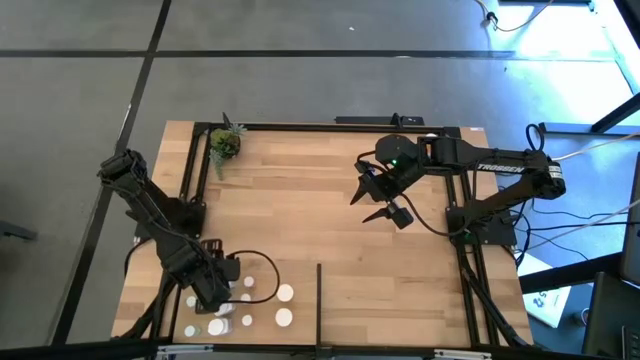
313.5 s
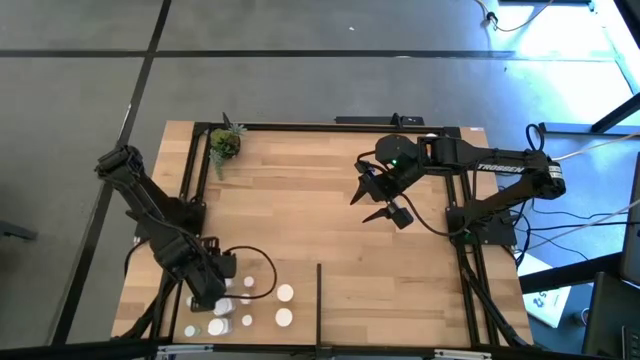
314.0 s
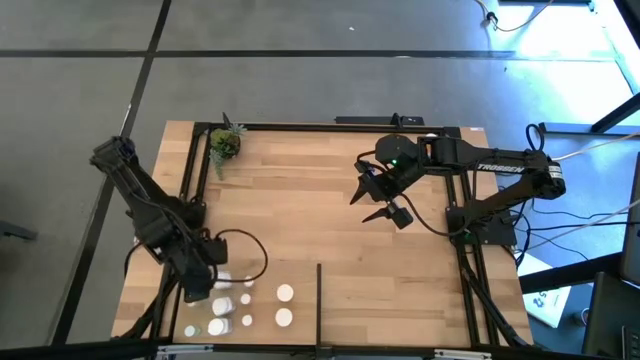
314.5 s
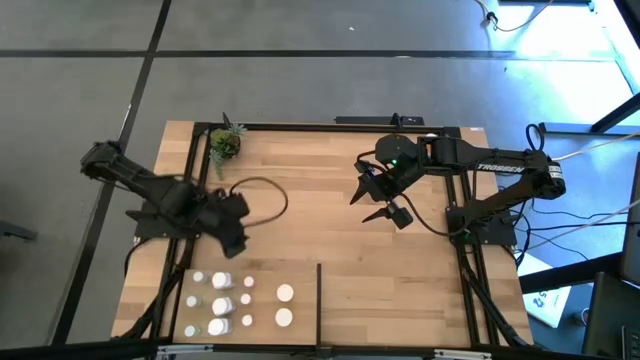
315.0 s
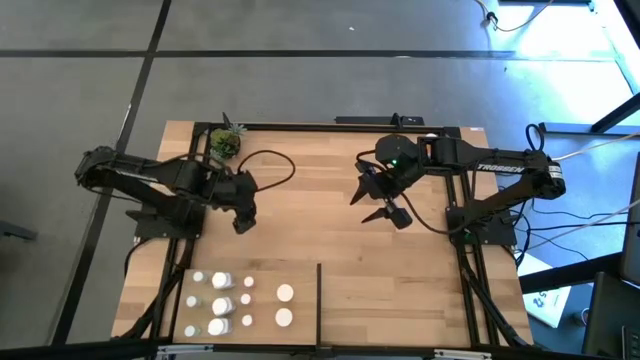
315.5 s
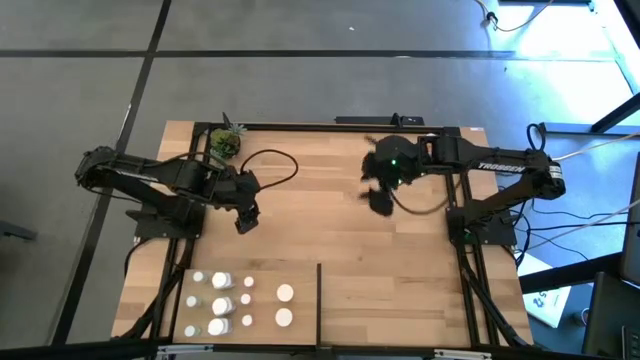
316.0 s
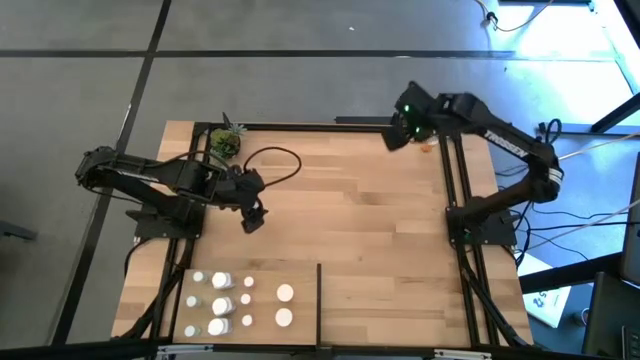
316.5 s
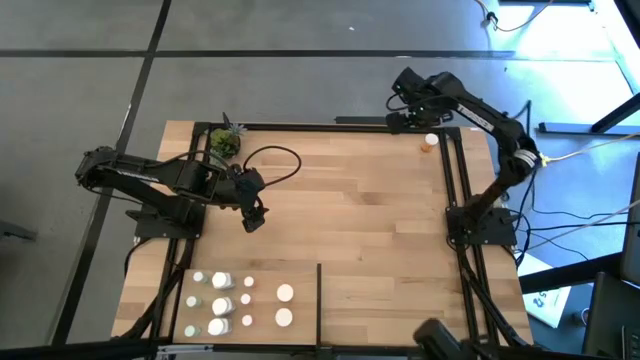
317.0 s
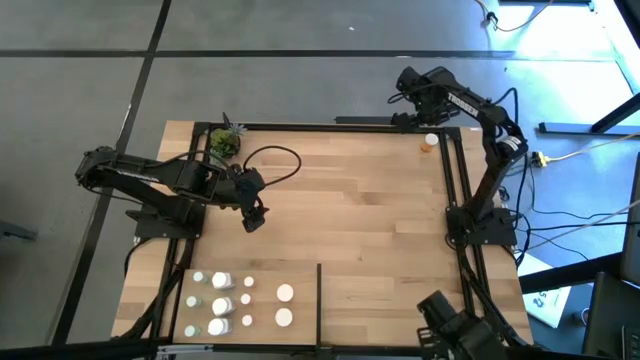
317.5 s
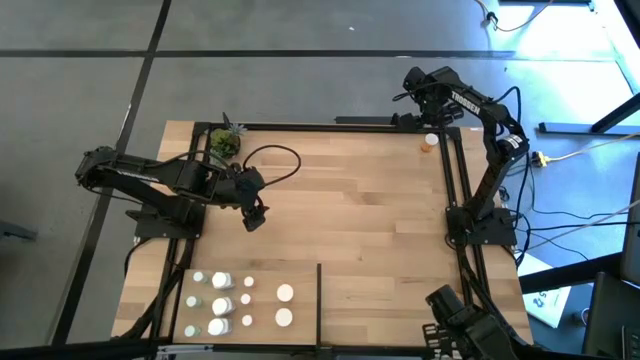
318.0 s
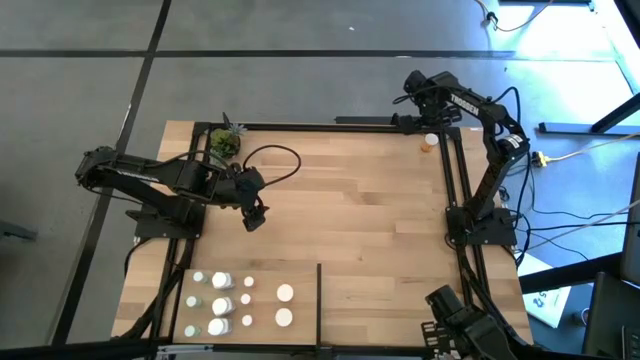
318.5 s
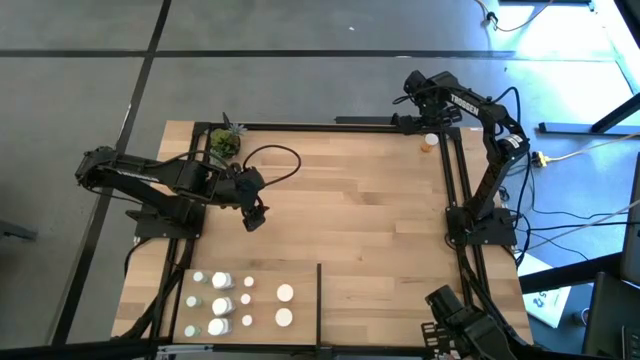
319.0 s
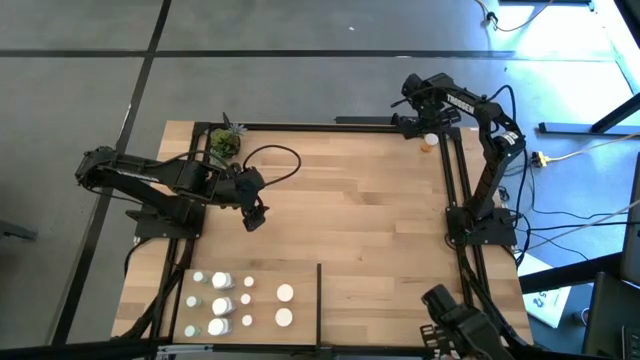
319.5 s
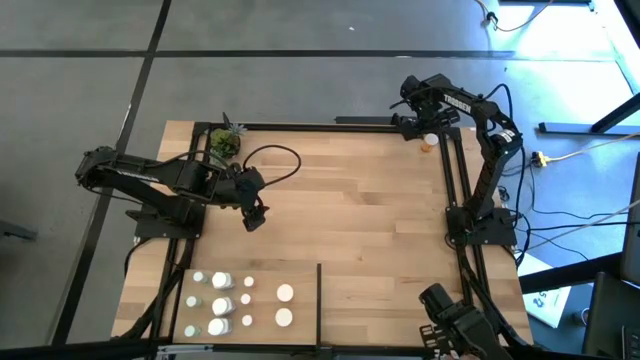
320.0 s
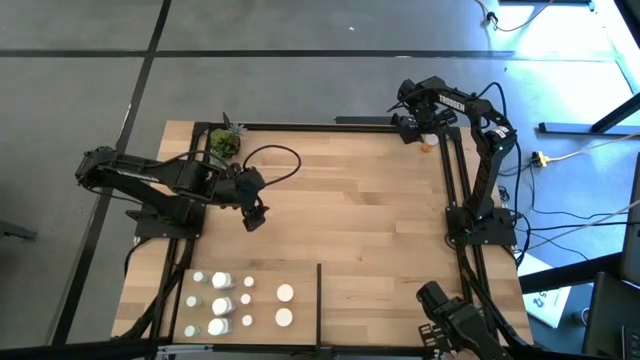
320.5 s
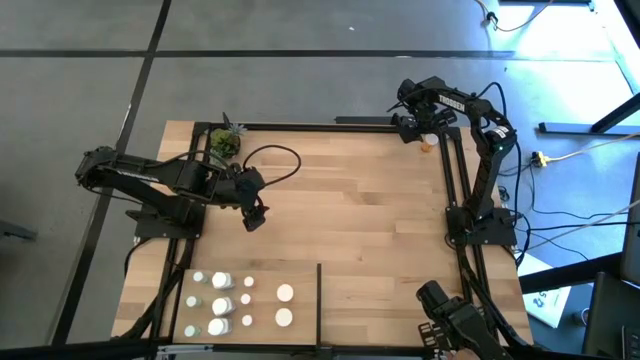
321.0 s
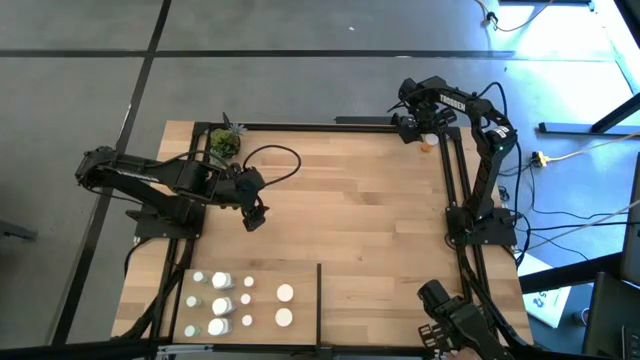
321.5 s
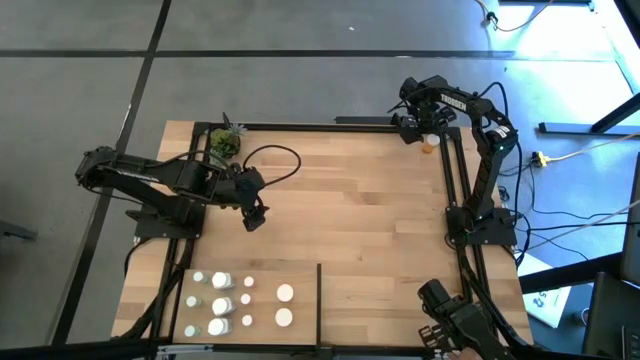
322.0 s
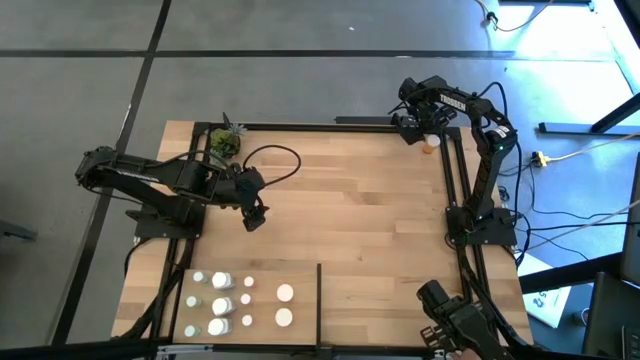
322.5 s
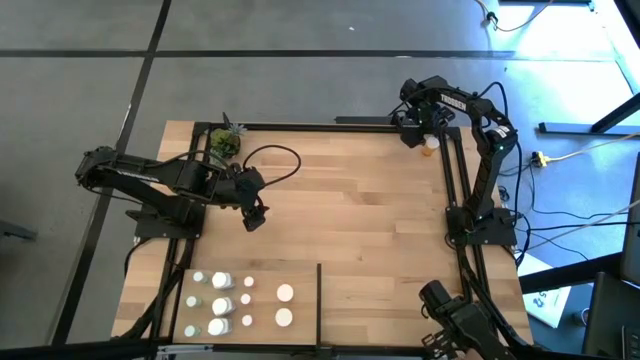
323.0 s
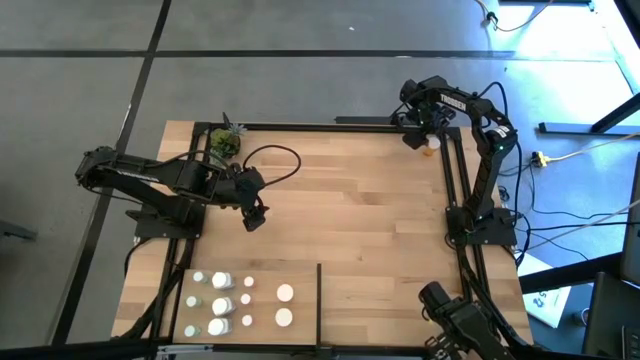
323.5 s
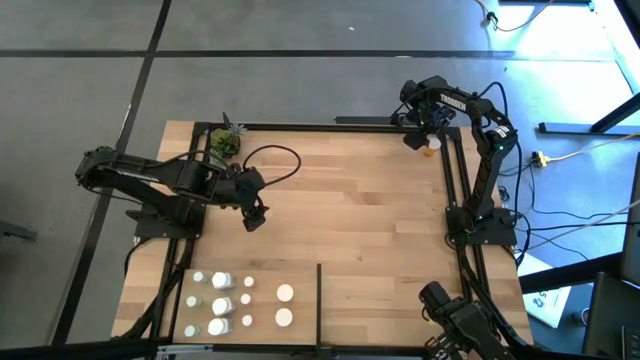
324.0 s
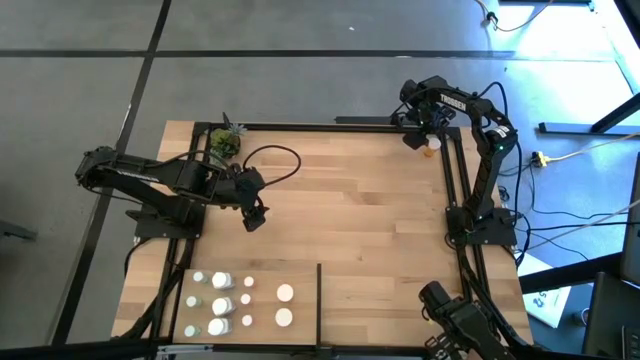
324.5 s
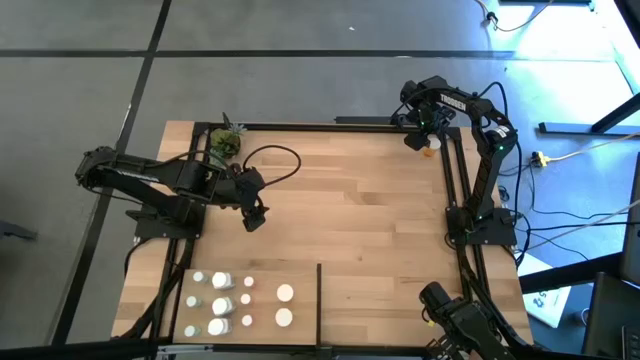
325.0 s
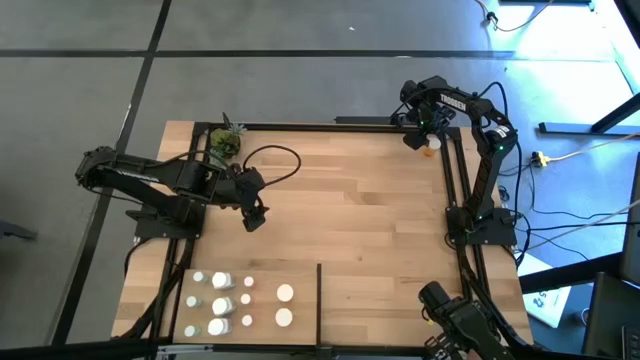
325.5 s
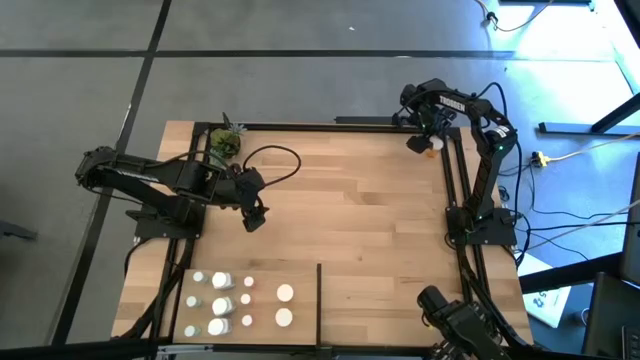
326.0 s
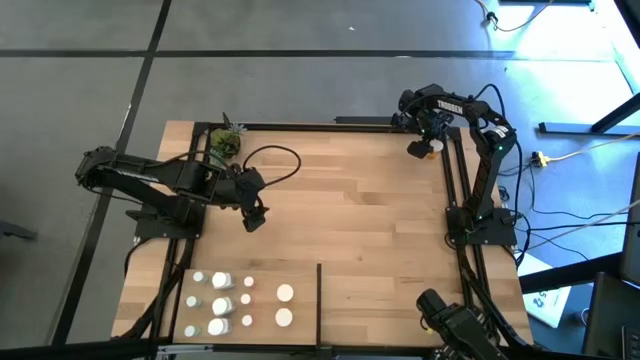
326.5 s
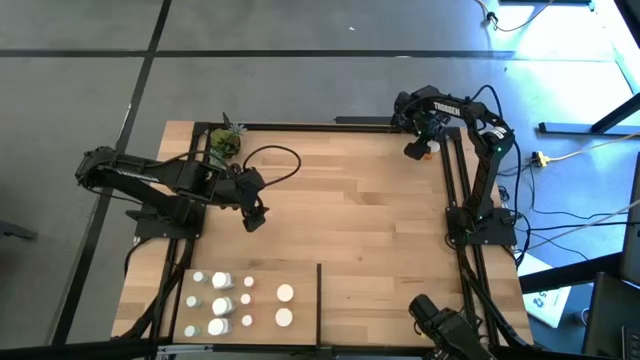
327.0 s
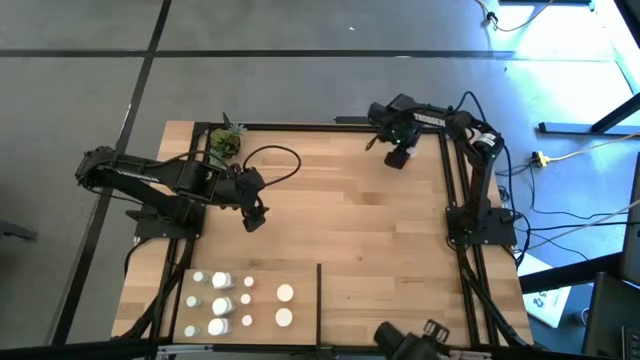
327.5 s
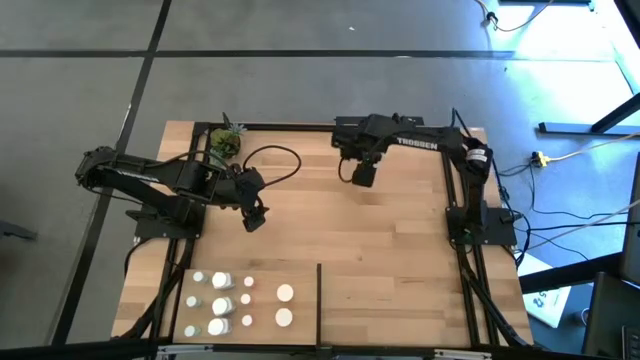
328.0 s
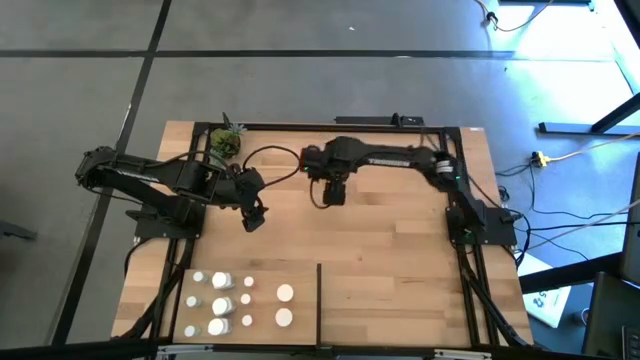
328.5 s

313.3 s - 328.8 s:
Task: Pick and place medicine bottles onto shelf by color
Put the orange pill bottle on the shelf aligned with the other orange pill bottle

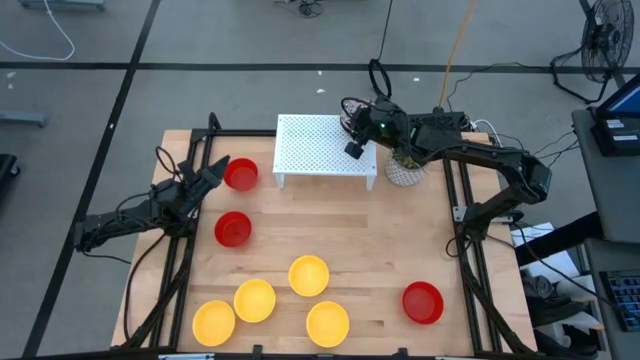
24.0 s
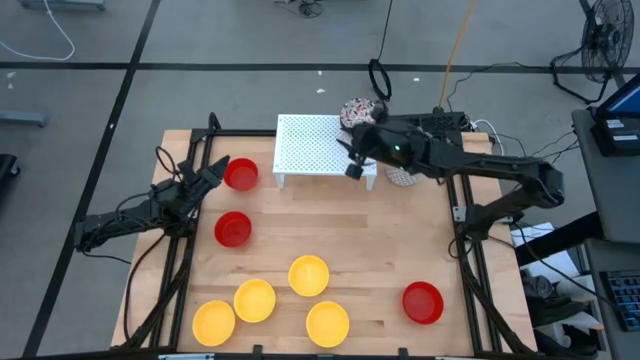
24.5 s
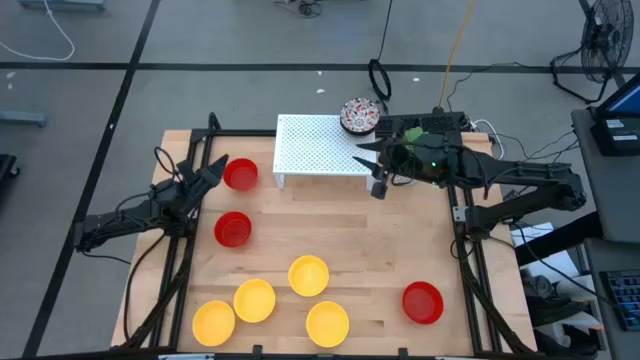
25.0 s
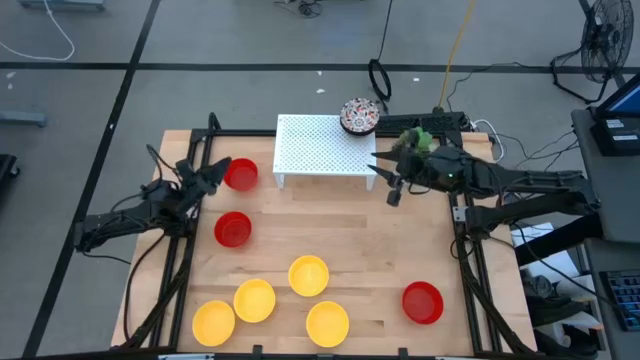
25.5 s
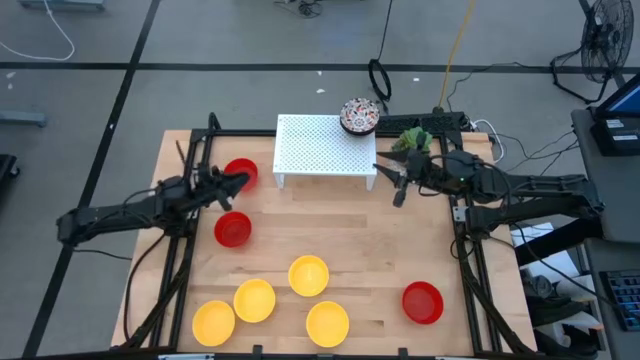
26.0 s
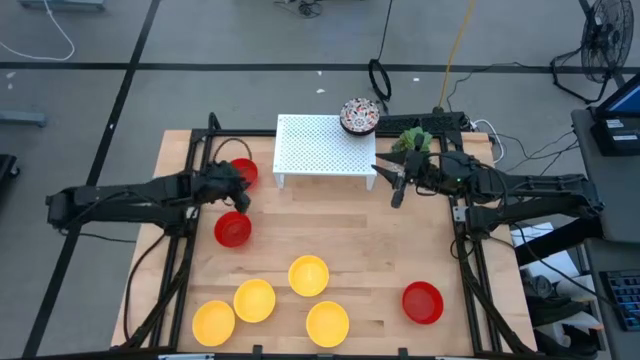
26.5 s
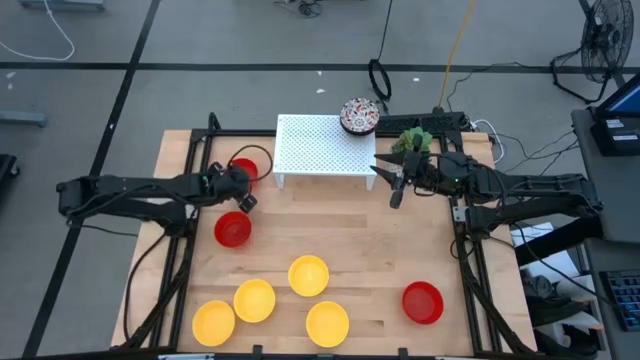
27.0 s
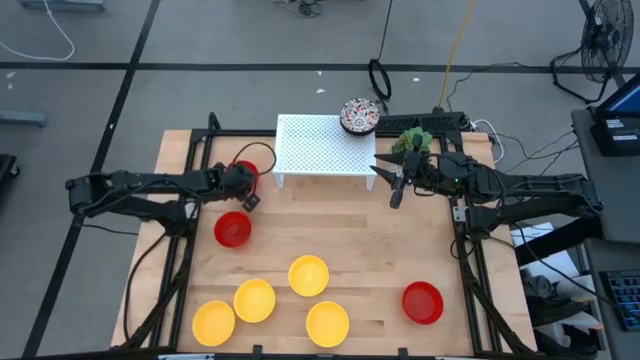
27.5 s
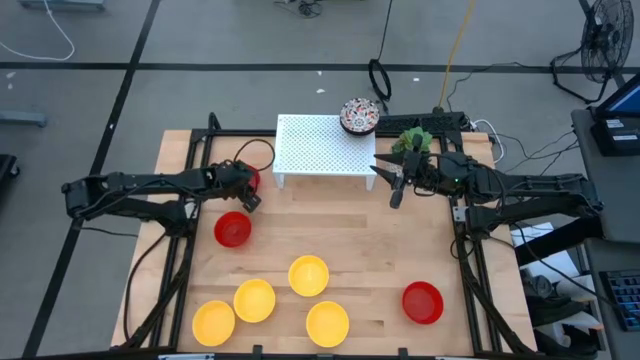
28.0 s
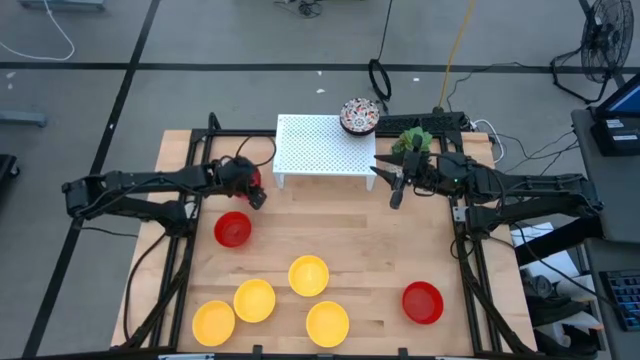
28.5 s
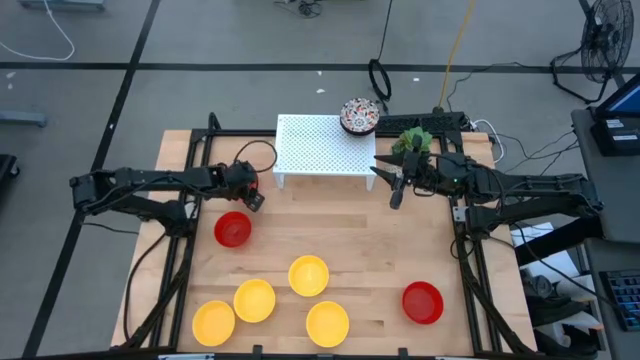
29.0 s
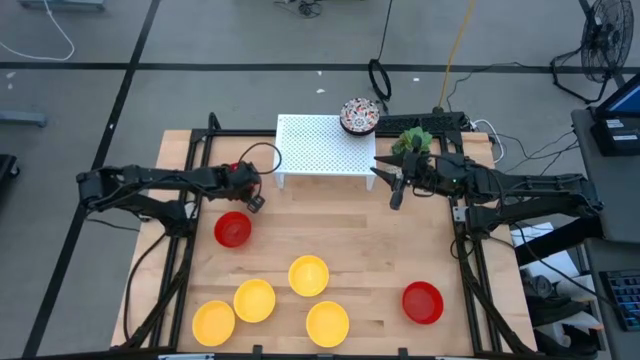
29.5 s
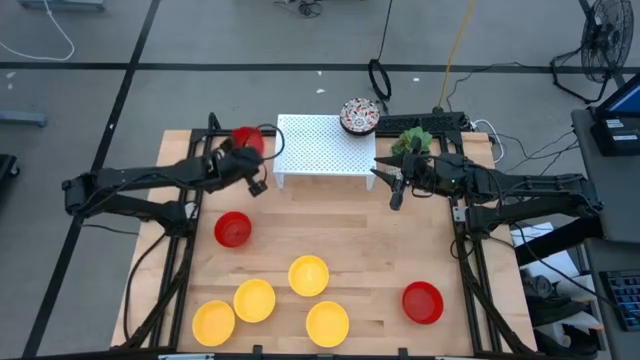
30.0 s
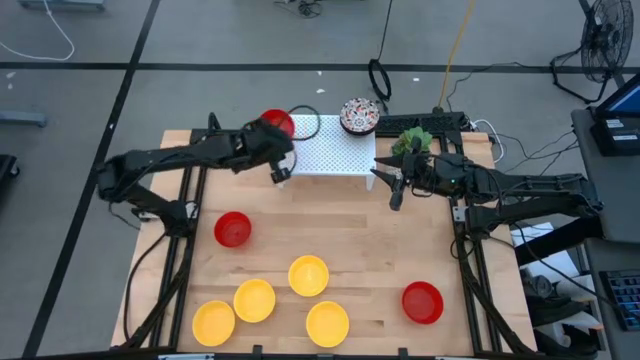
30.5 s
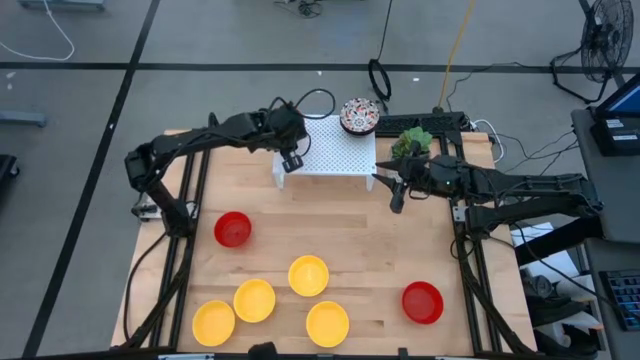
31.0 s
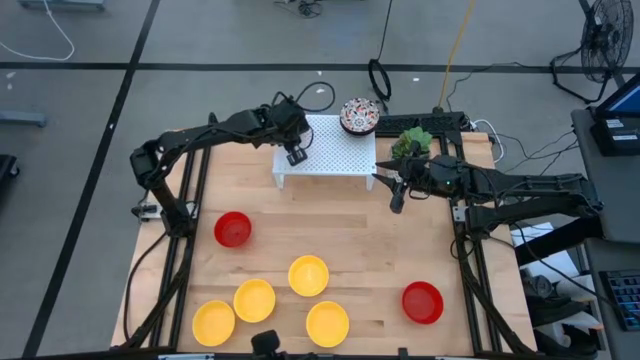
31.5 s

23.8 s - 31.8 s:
Task: Pick & Place Mini bowls
Put the red bowl on the shelf
